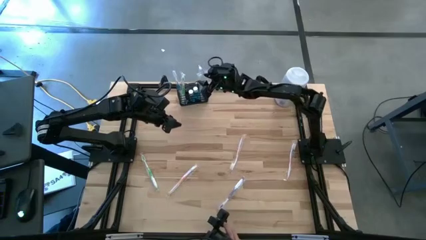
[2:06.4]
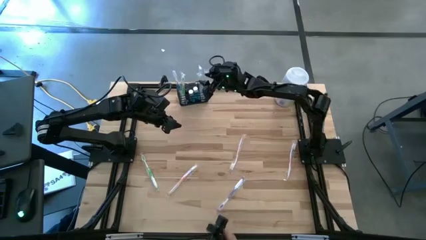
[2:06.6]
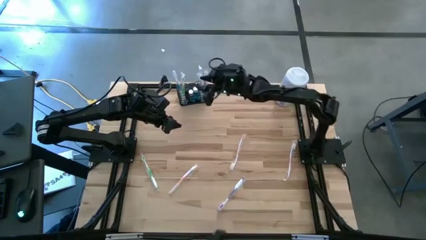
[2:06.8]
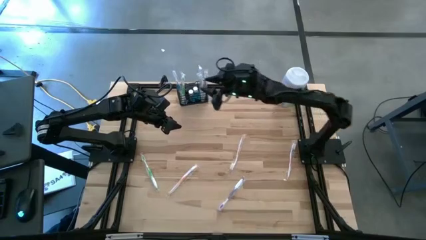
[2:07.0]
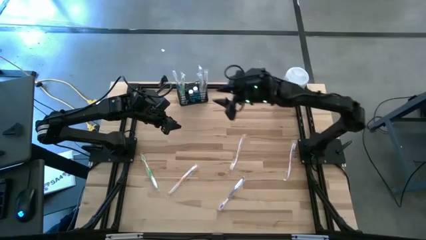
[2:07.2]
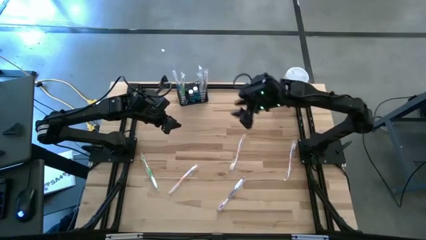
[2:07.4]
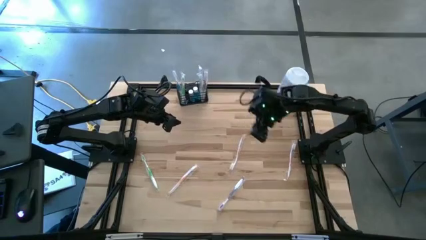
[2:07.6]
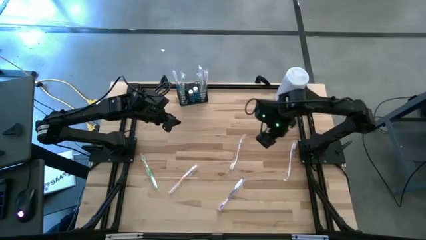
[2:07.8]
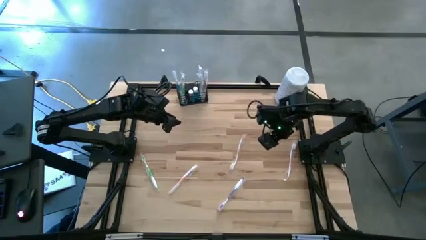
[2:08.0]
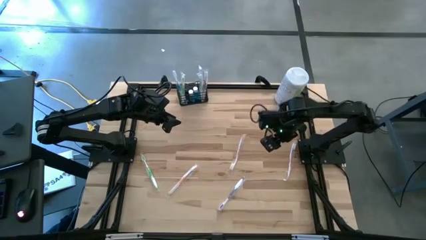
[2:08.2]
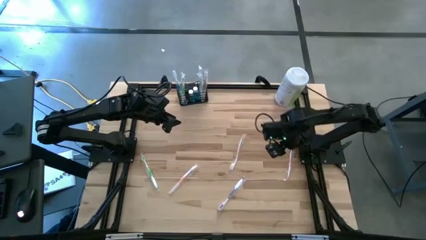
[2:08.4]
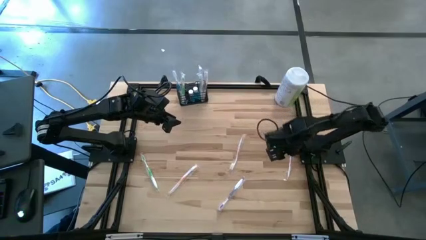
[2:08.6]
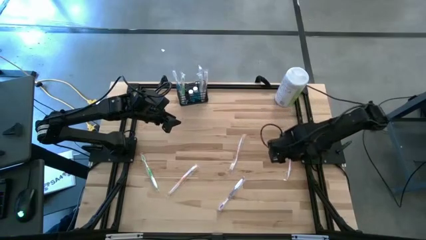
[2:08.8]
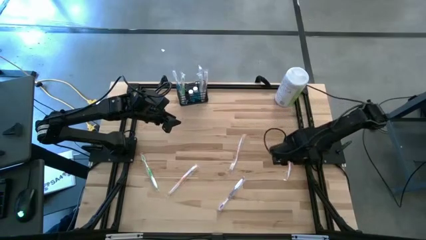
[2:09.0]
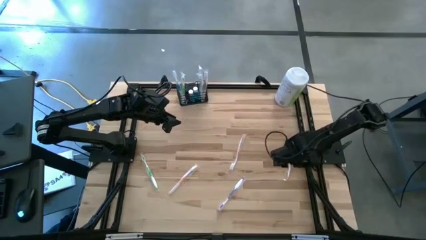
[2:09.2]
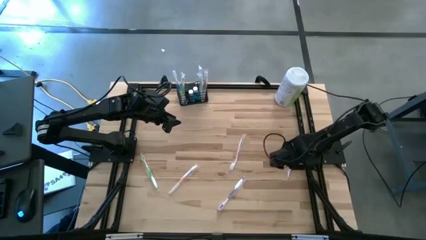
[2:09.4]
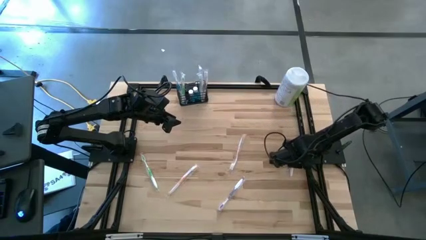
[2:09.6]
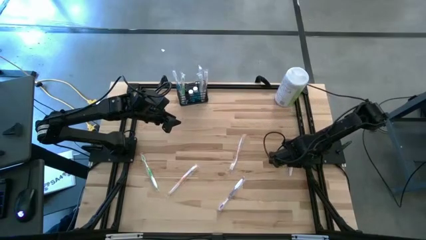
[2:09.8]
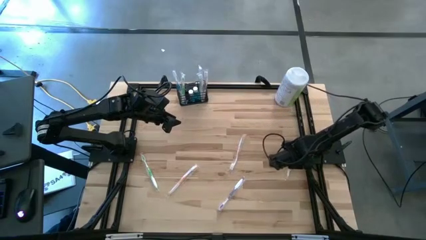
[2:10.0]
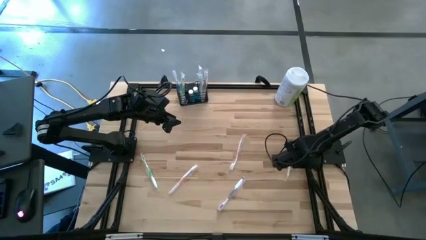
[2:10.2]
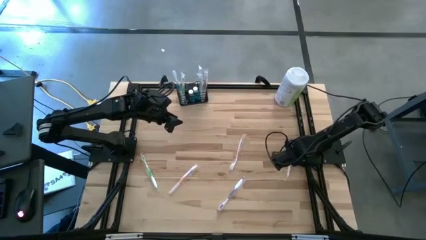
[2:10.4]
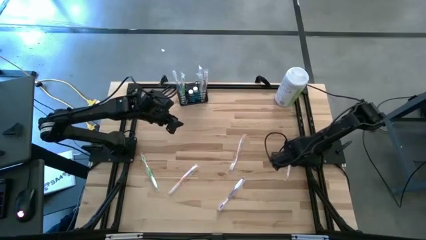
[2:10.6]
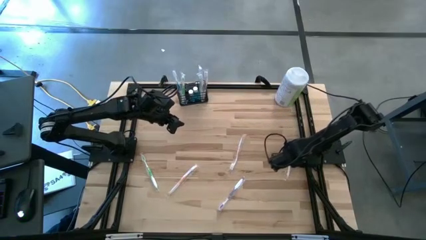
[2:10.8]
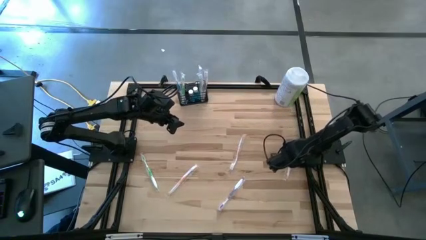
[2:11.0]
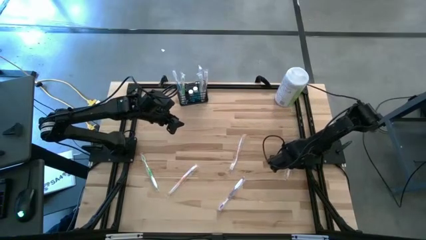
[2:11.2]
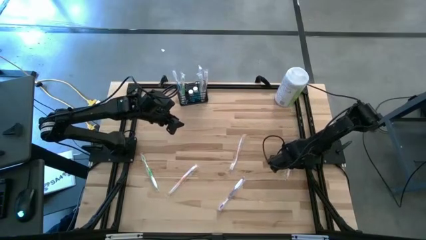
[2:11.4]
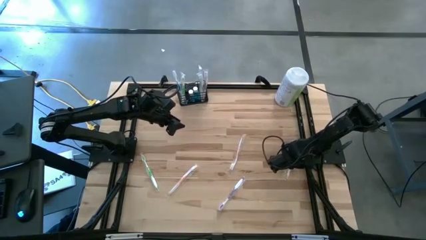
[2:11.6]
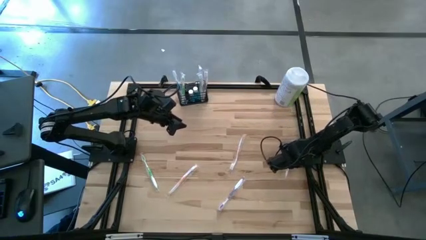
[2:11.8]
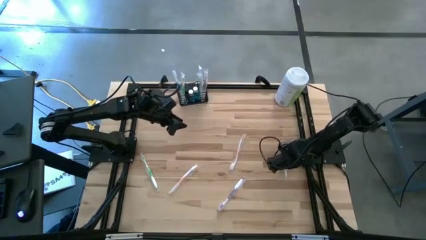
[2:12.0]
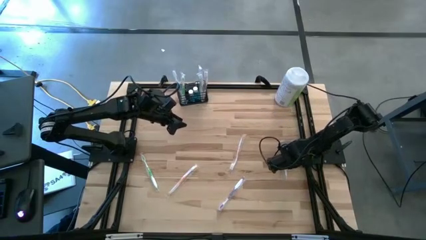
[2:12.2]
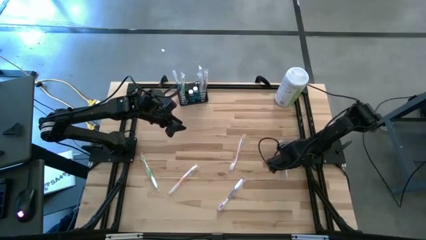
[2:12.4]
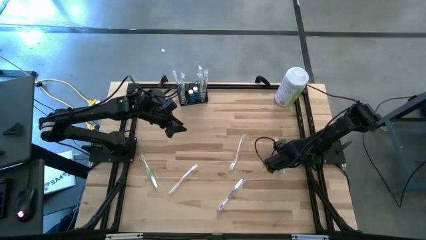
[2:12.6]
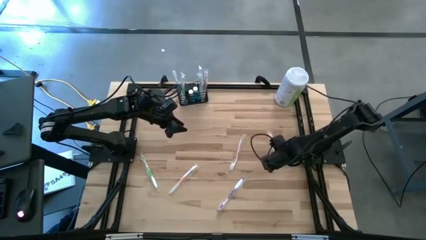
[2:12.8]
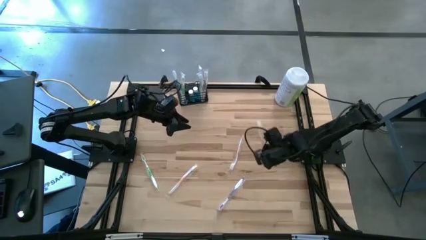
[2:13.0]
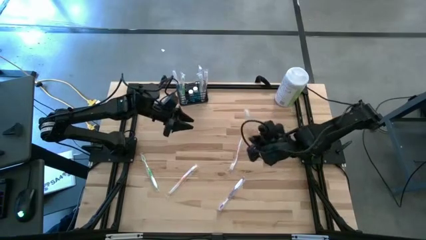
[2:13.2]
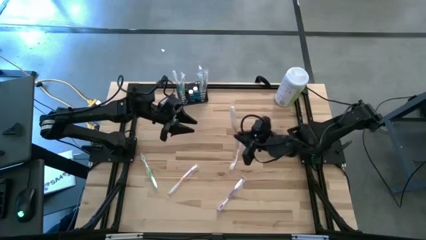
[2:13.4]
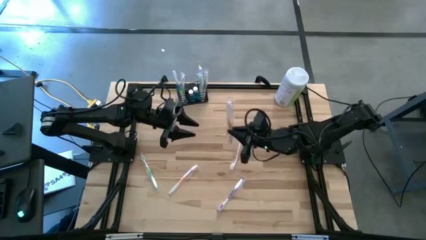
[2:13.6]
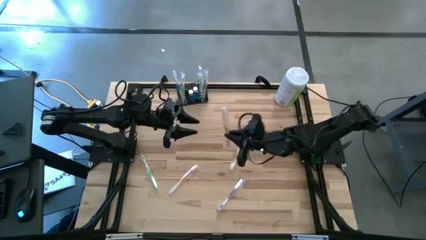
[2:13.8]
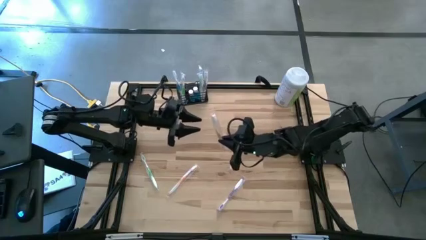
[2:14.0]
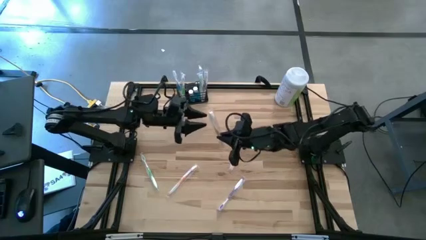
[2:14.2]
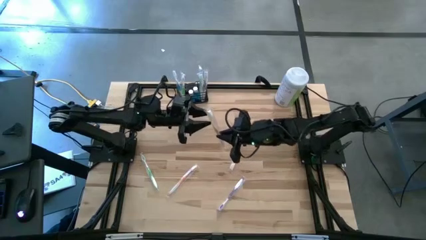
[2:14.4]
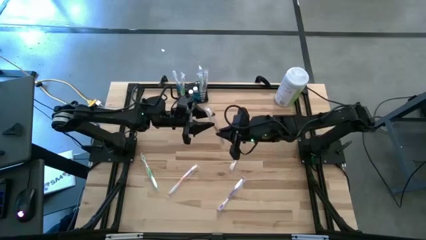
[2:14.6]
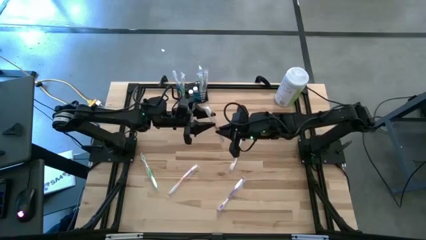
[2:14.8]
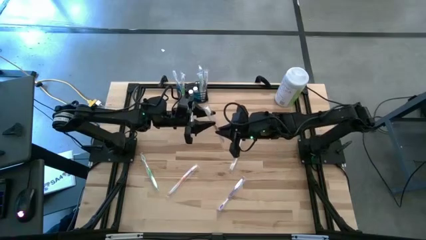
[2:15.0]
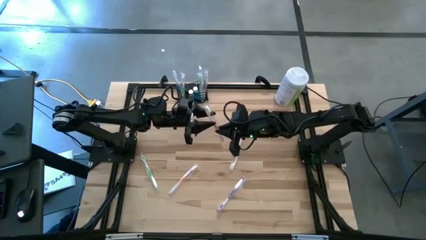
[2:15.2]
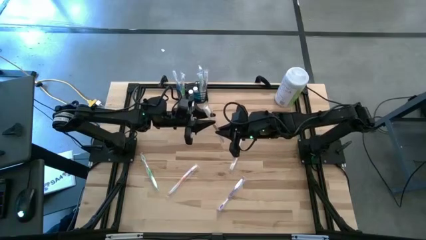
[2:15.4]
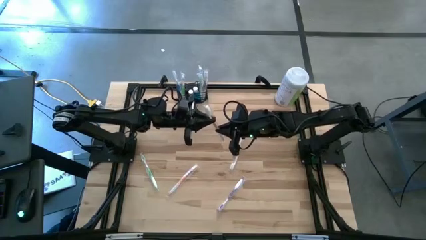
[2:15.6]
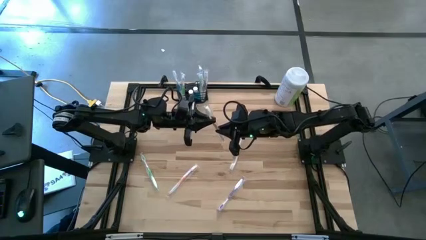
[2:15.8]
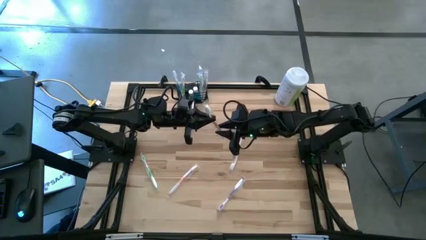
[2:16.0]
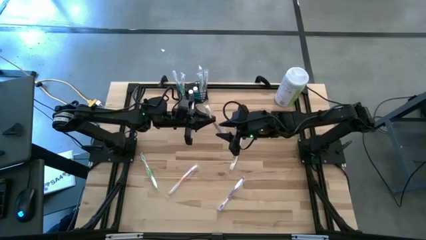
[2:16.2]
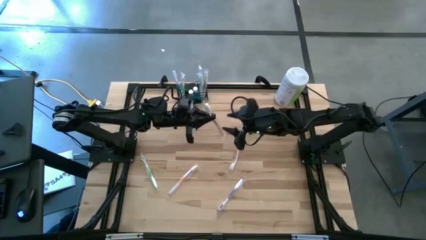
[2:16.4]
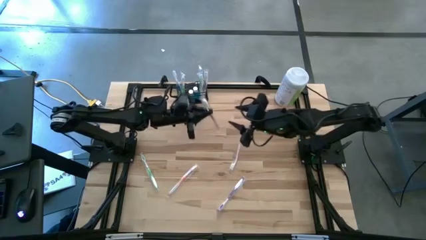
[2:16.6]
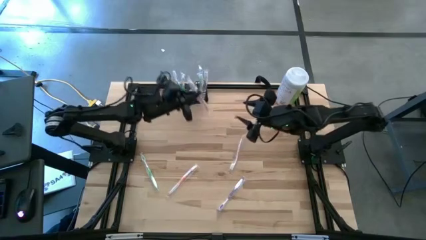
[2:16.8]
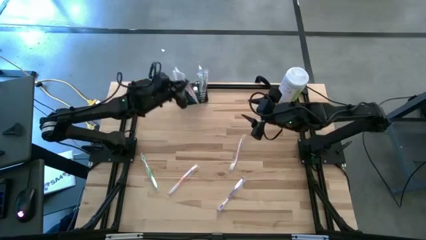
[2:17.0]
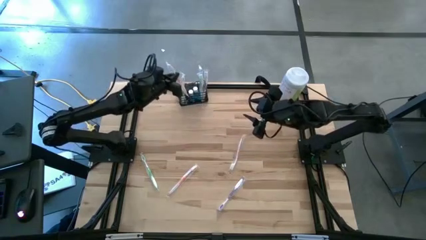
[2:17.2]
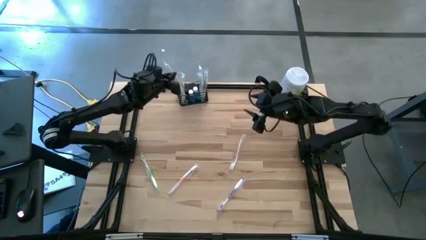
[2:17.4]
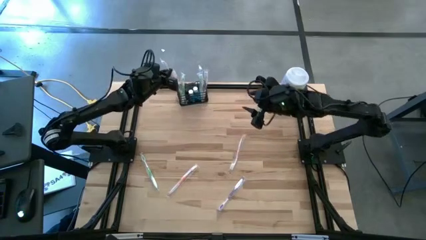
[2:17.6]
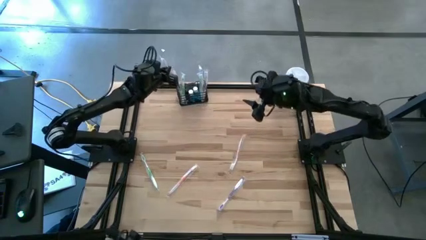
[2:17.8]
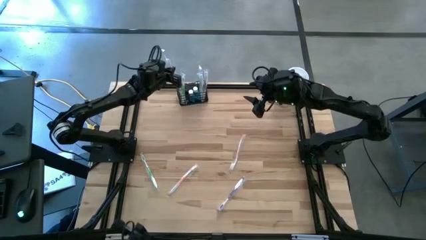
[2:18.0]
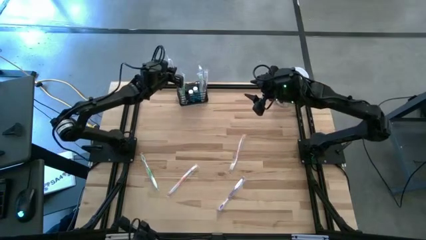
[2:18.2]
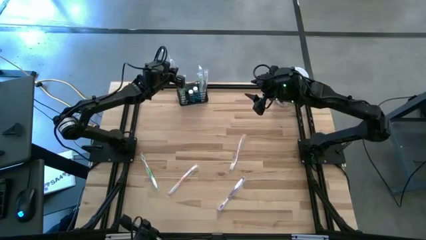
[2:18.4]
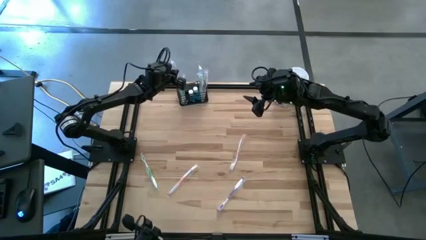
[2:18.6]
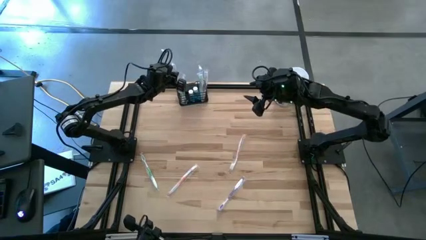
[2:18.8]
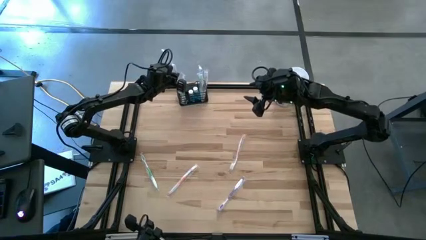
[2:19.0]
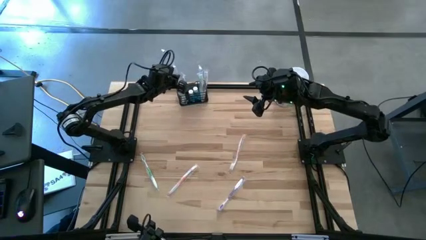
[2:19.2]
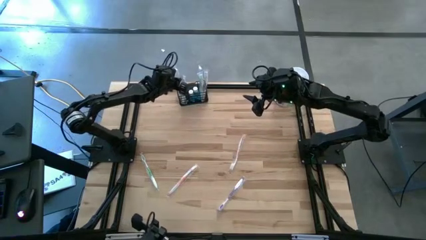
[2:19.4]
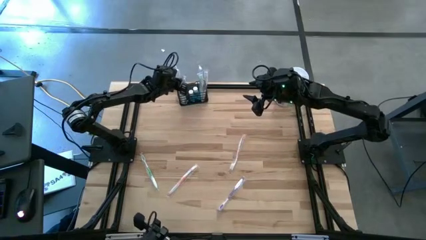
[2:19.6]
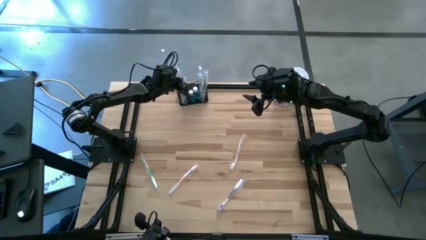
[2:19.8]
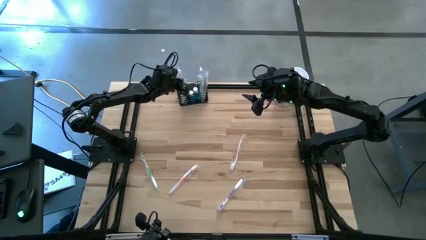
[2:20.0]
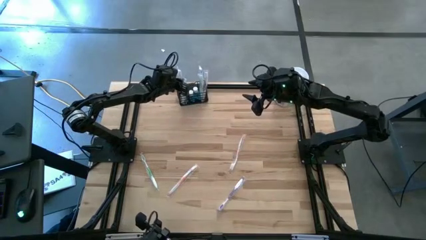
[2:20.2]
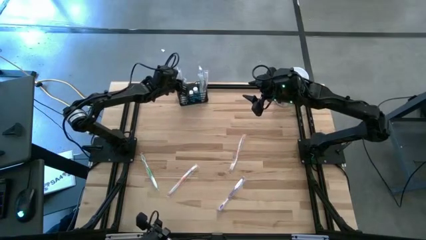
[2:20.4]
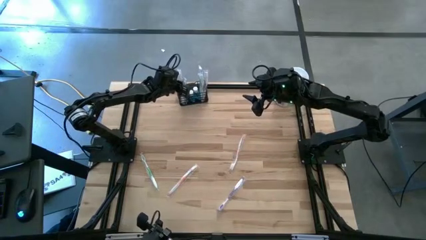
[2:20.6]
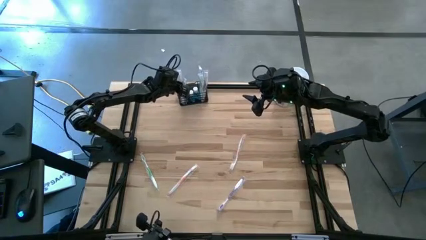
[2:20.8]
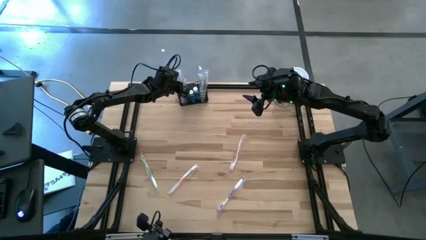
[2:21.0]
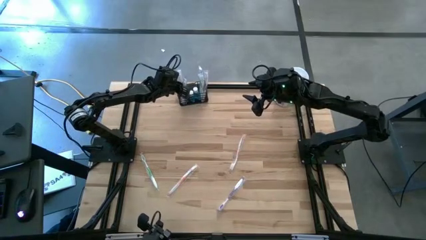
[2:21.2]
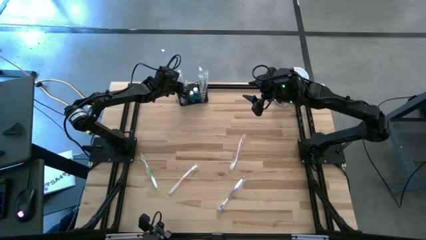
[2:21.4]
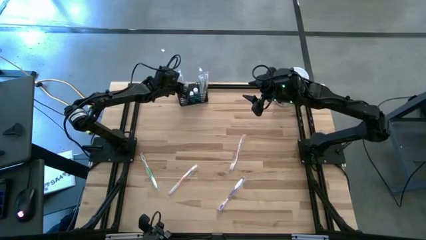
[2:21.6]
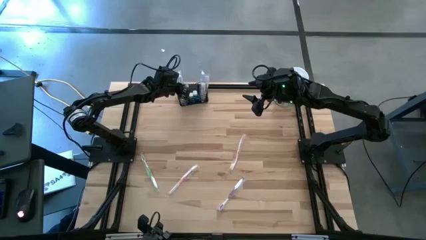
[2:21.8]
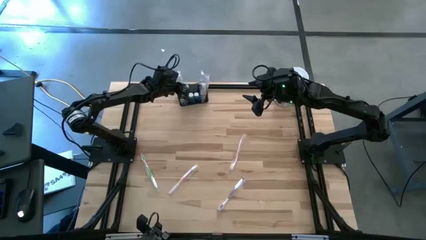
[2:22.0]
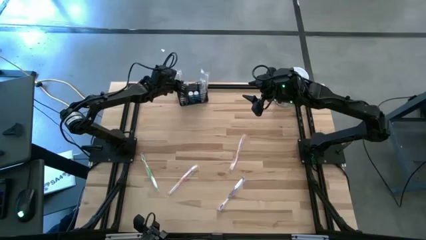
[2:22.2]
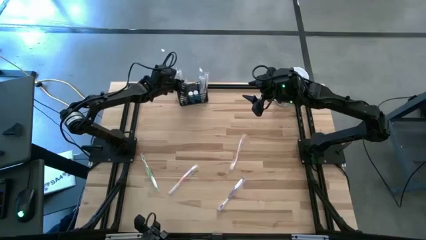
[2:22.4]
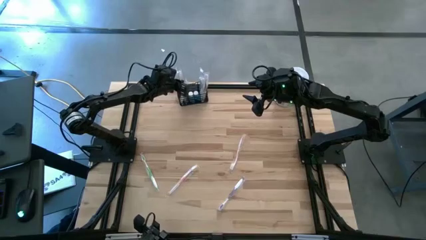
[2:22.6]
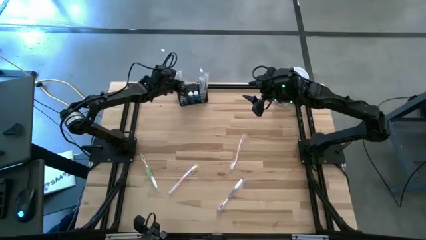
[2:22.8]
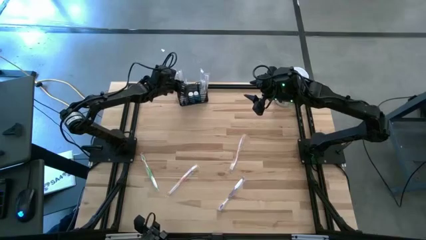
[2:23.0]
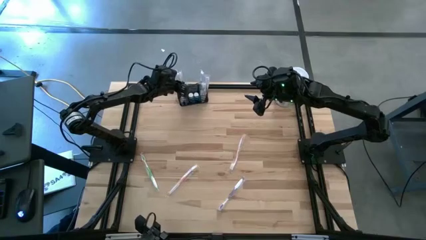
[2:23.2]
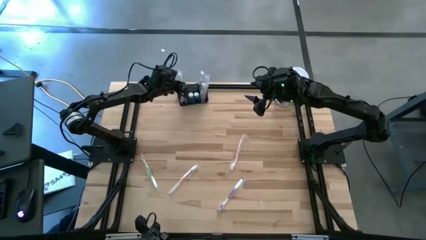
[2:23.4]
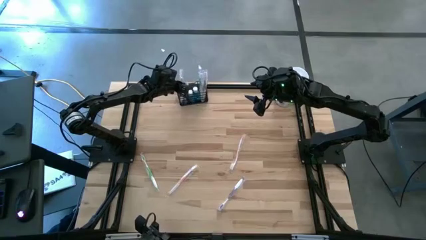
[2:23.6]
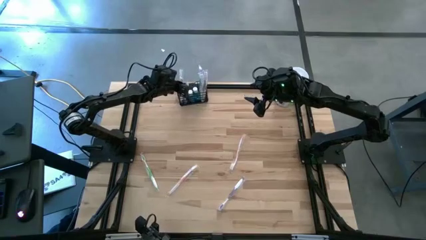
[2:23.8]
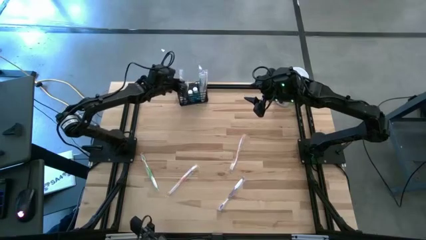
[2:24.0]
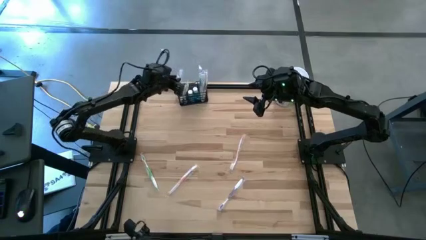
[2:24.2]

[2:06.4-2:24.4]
Task: Pick & Place toothbrushing station
Put the right orange toothbrush into the black wire organizer
